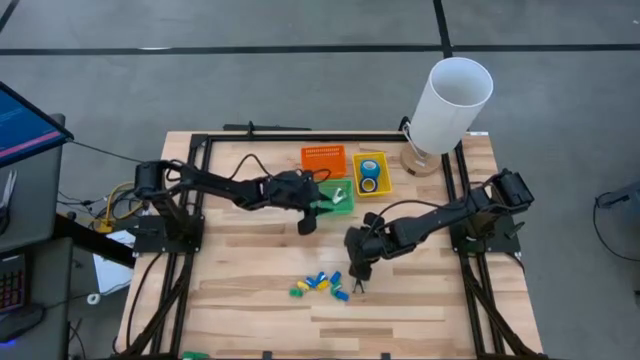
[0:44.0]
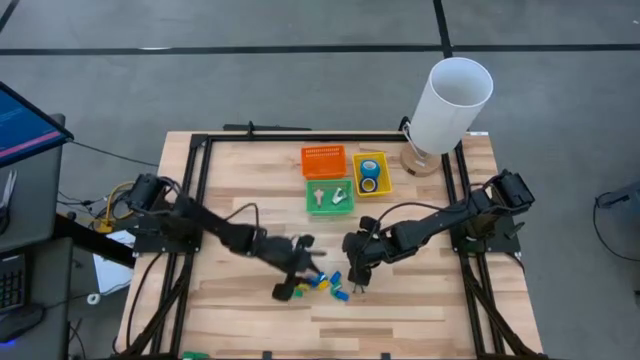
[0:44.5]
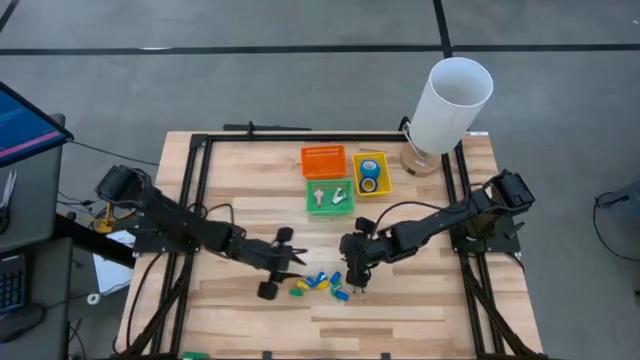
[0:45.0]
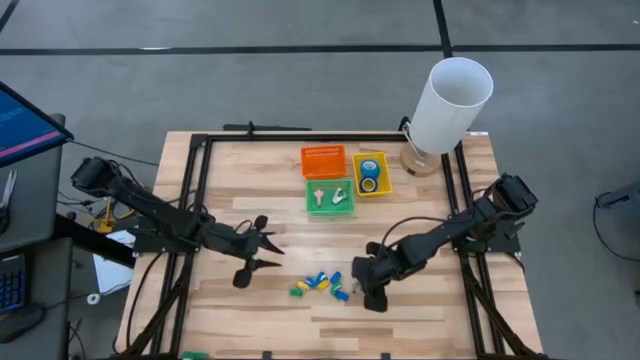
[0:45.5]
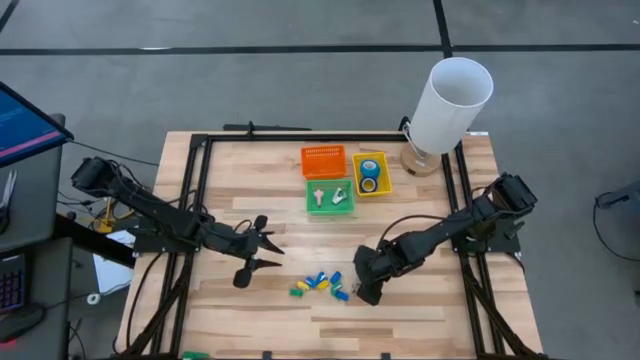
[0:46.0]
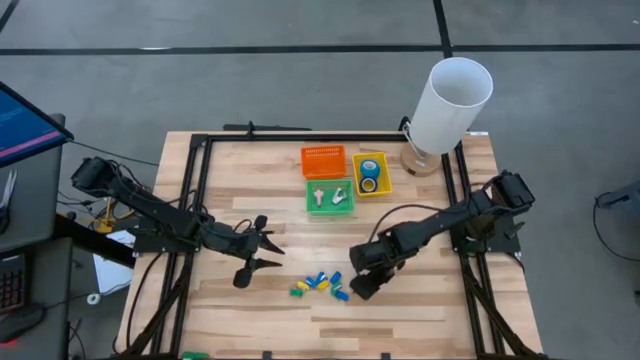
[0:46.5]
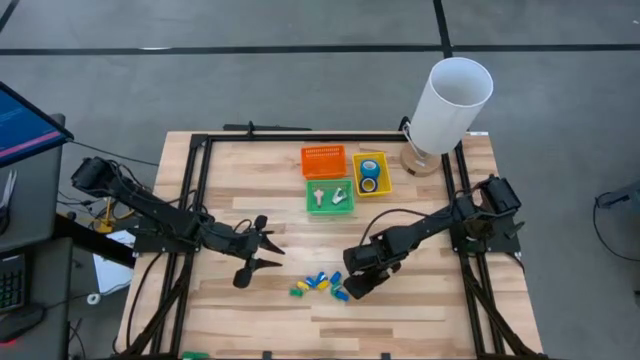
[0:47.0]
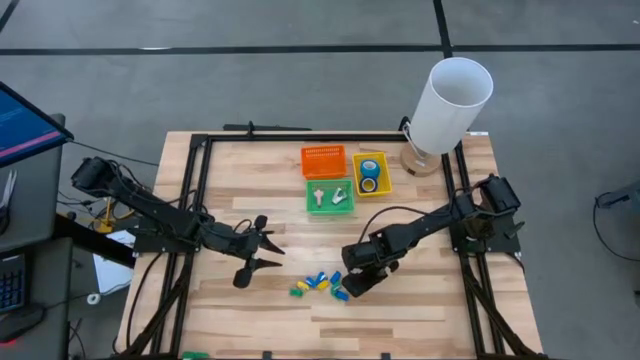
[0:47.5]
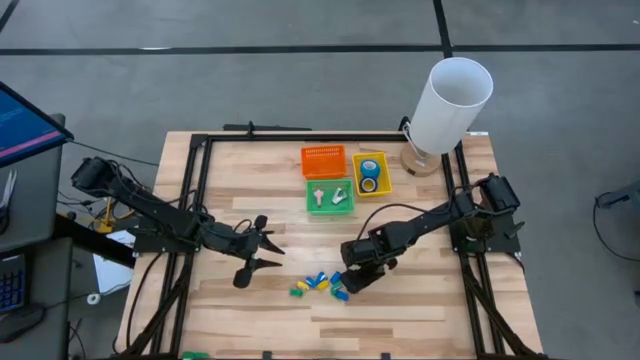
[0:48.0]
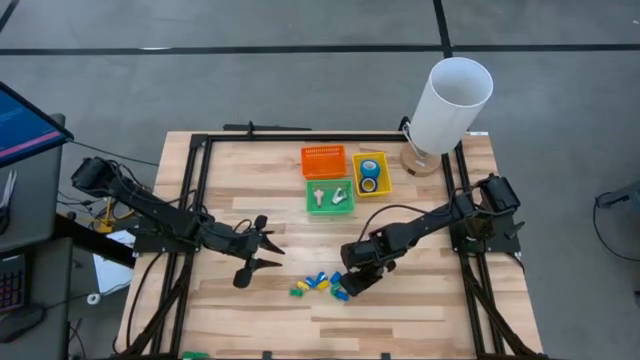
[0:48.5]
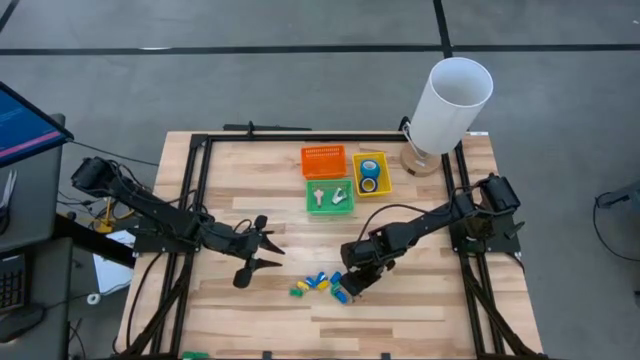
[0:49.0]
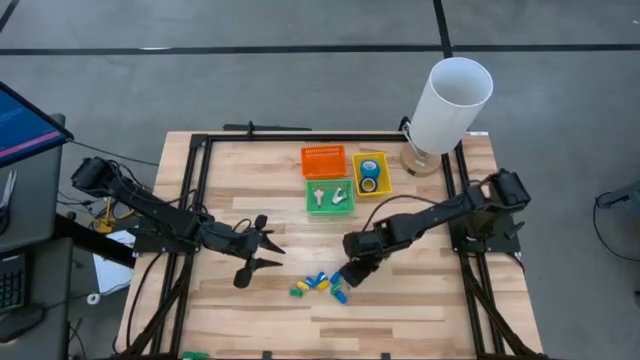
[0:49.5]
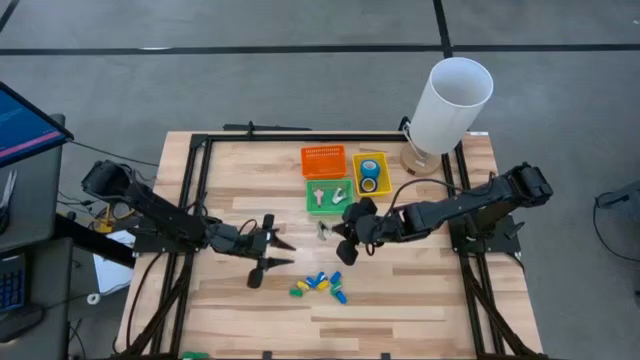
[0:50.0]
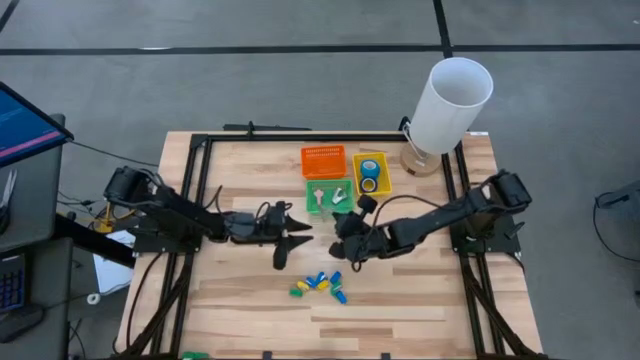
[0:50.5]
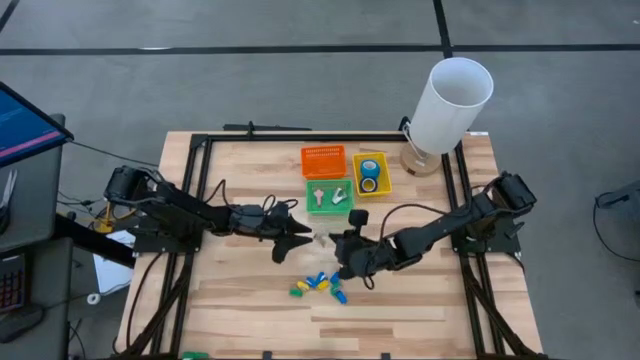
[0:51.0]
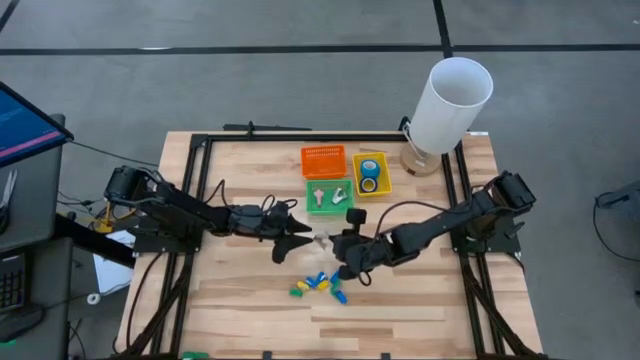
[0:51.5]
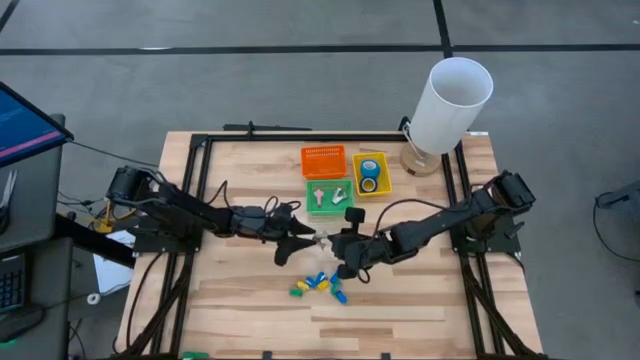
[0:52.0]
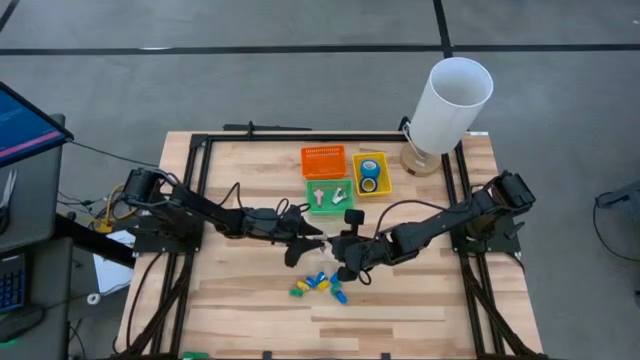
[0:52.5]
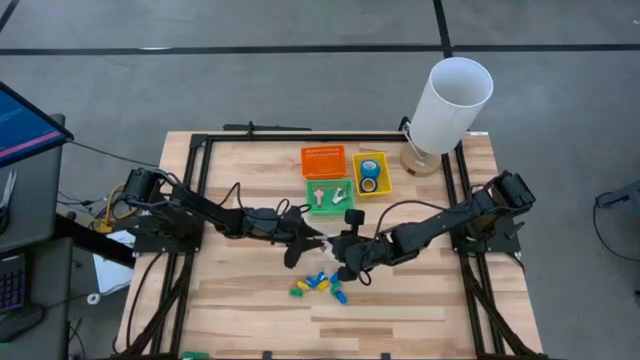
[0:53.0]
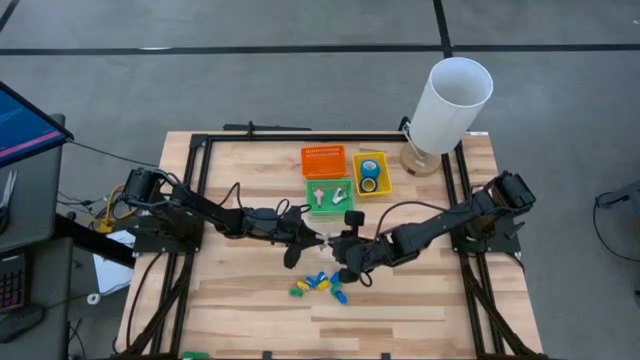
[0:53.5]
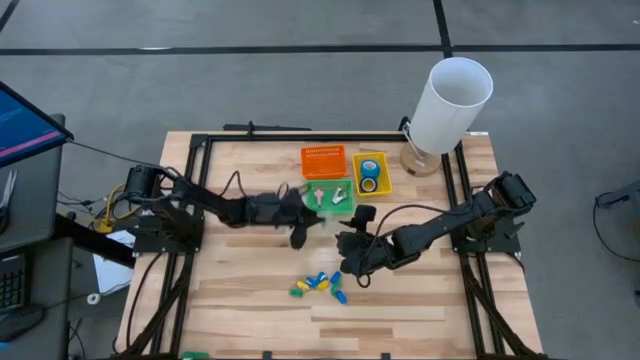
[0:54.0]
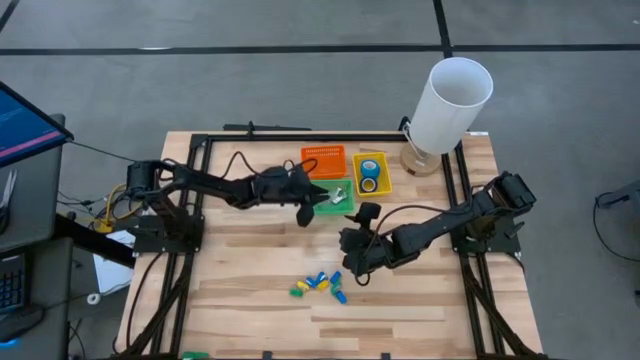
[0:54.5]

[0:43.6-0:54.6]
Task: Pick and place Stapler, Stapler remover, tape
Put the gray staple remover into the green bin

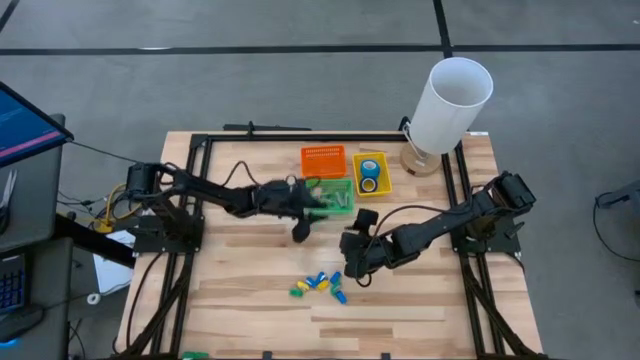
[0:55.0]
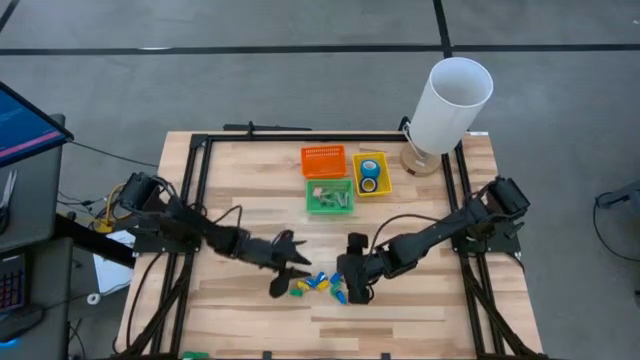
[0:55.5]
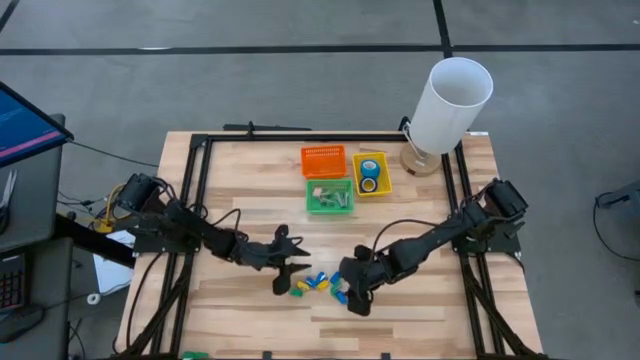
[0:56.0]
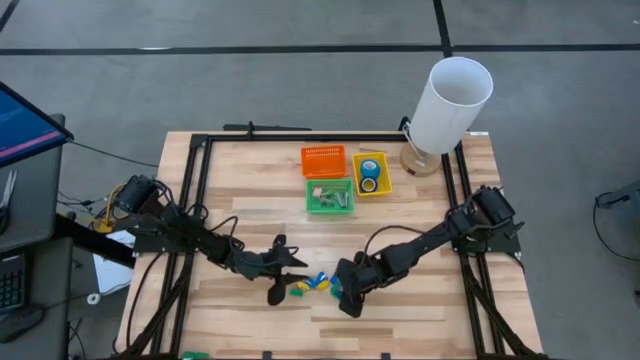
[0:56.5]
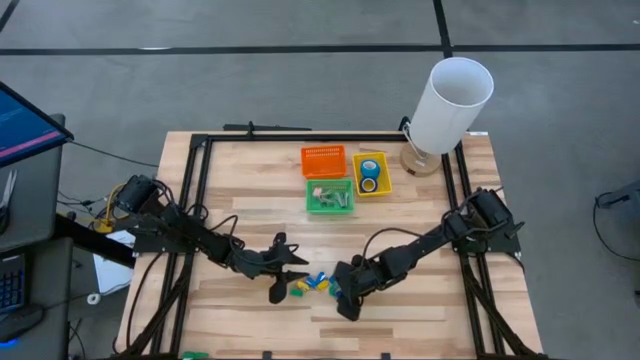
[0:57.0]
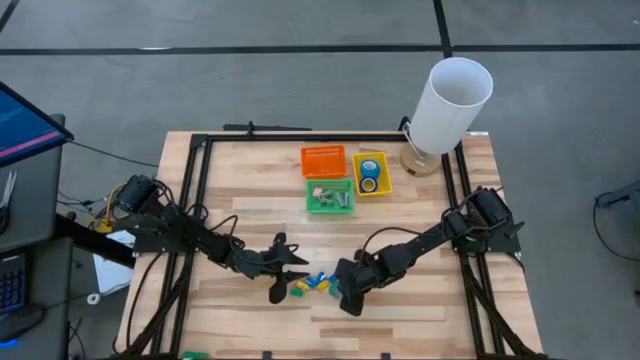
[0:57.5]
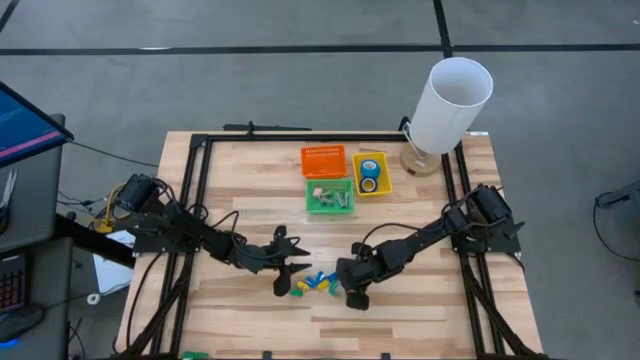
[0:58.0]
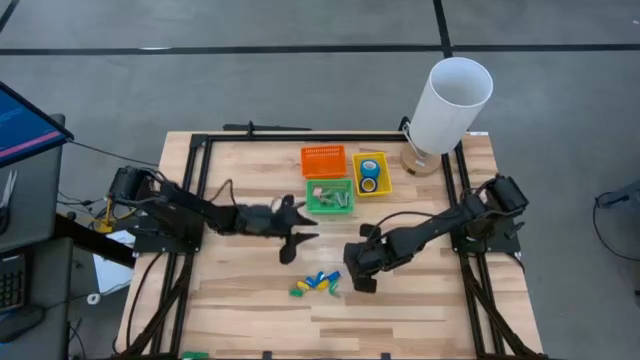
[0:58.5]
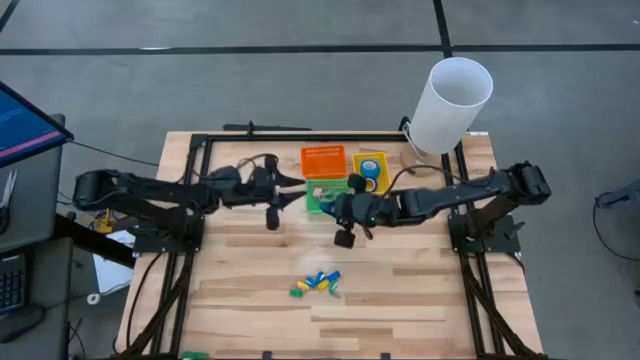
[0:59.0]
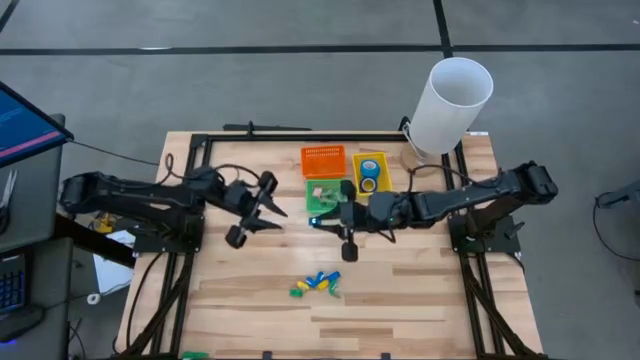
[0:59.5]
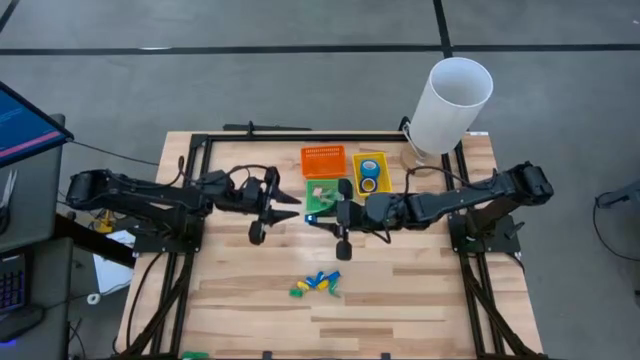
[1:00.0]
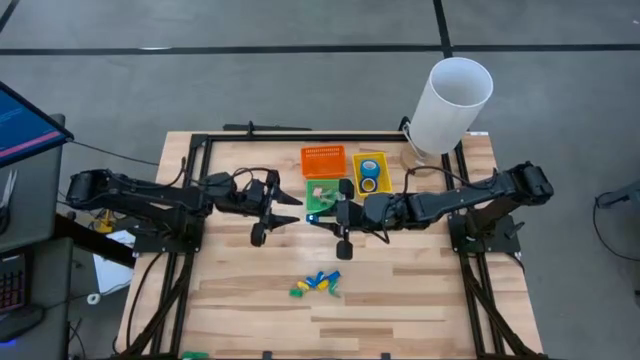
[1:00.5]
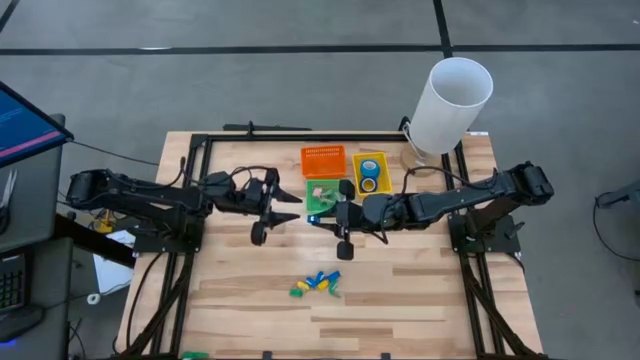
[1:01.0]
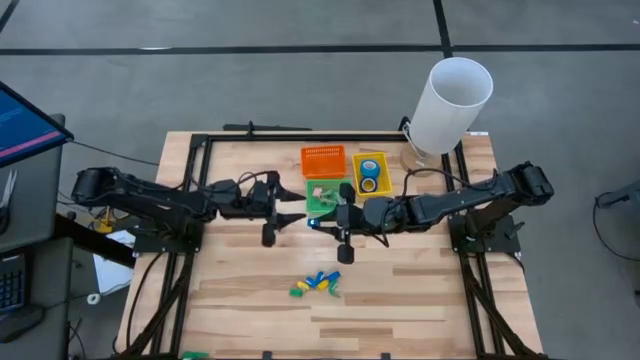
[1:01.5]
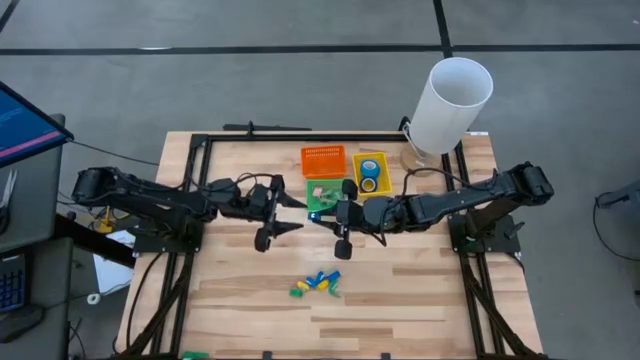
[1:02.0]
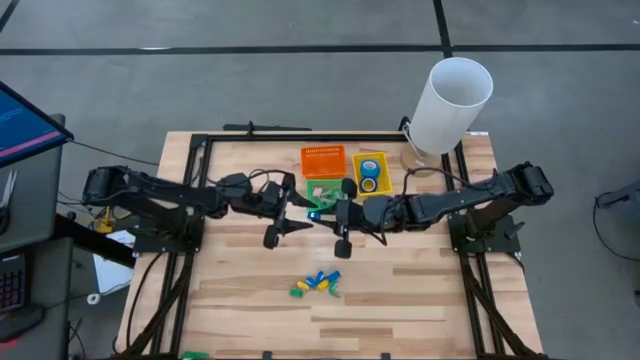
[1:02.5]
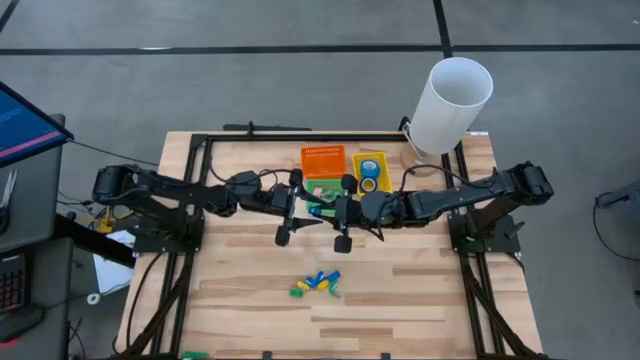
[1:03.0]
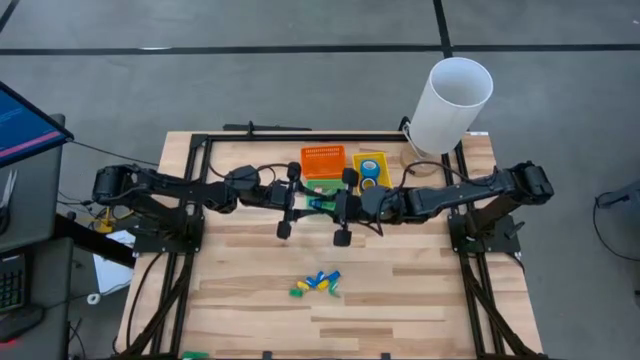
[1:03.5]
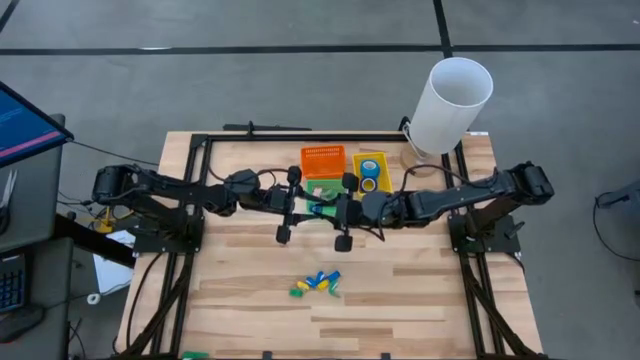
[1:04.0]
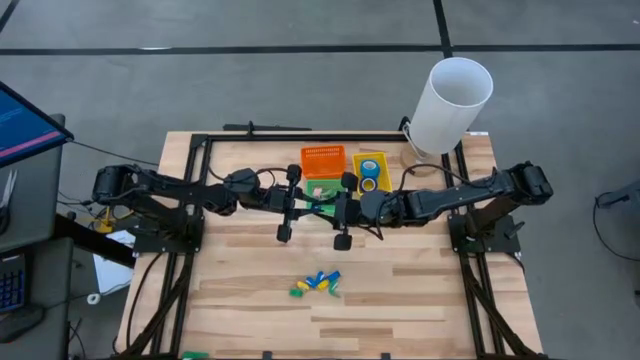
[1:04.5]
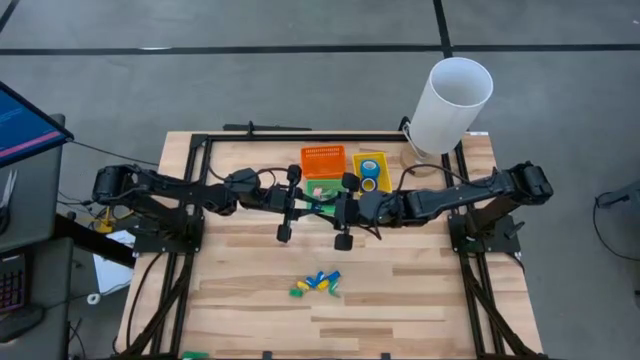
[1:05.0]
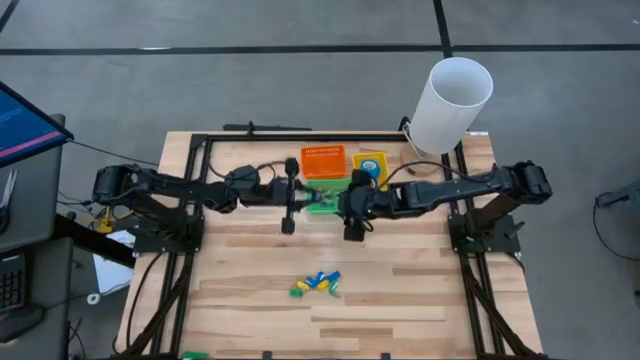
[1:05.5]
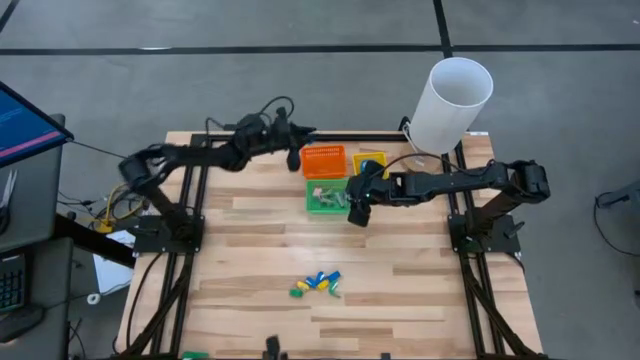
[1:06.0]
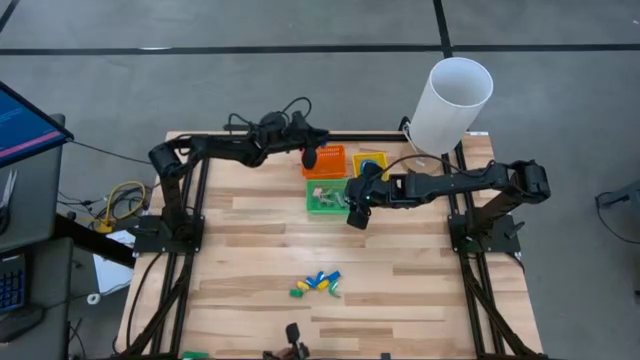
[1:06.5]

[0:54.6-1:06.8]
Put the blue stapler into the orange bin
